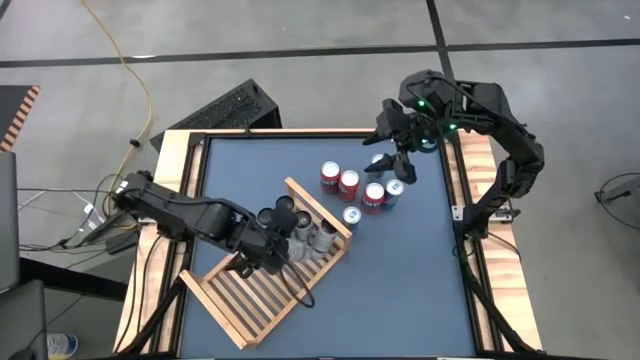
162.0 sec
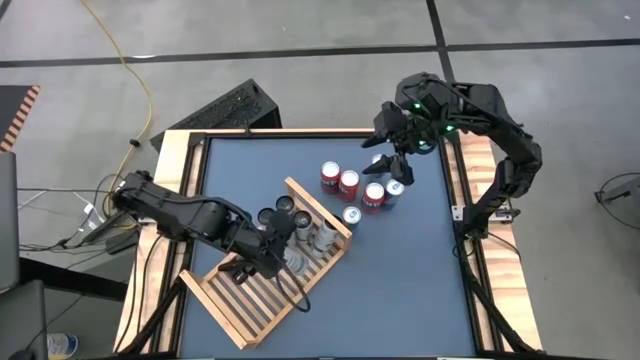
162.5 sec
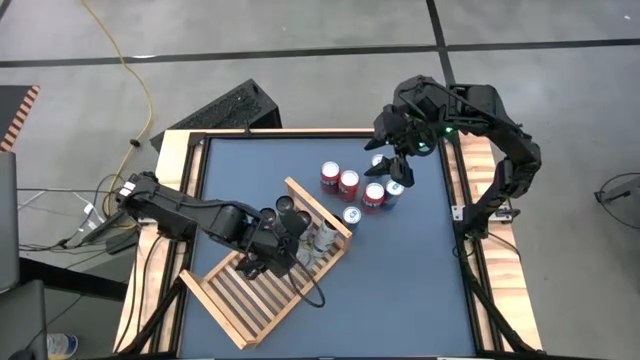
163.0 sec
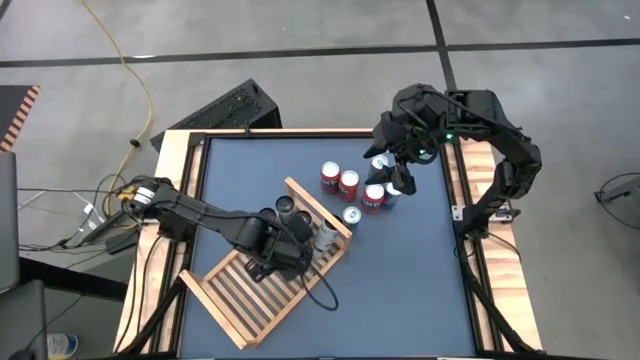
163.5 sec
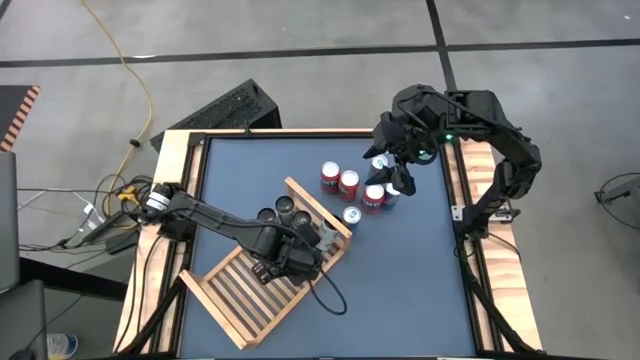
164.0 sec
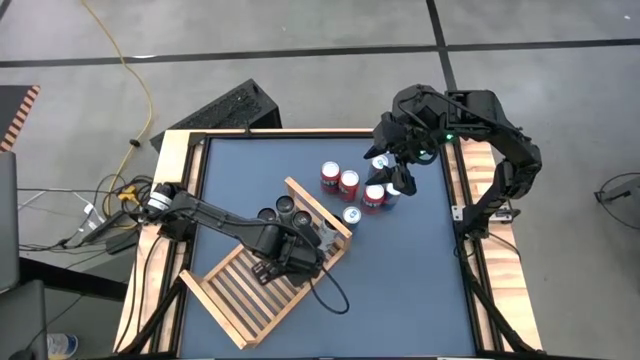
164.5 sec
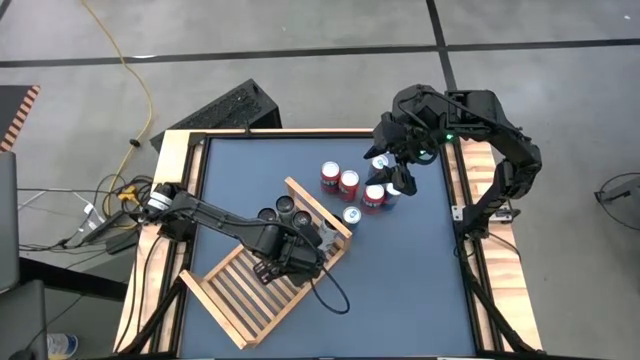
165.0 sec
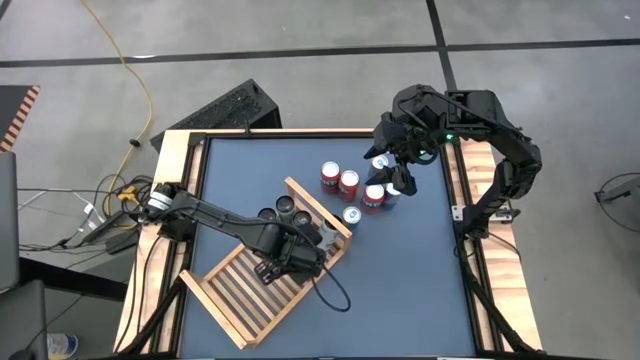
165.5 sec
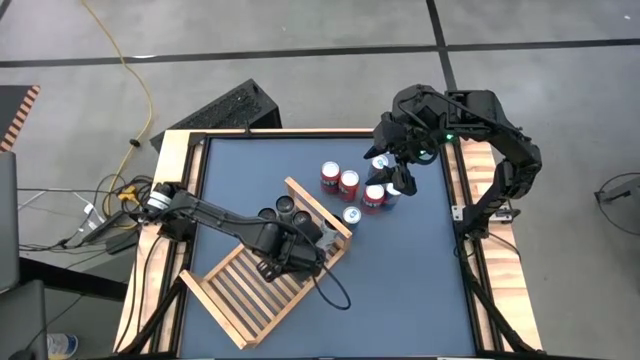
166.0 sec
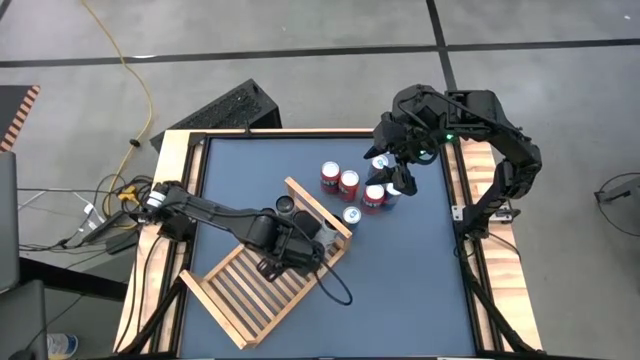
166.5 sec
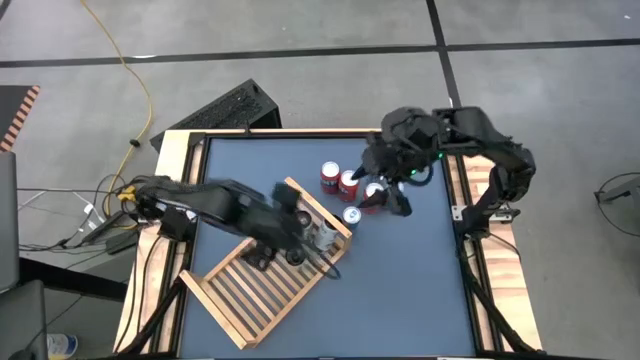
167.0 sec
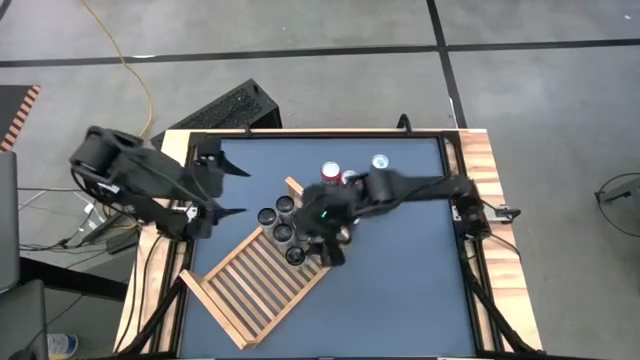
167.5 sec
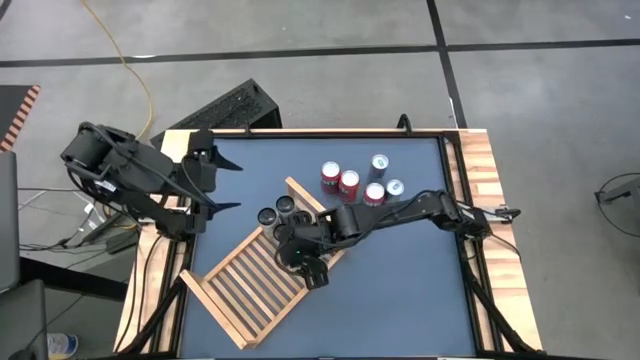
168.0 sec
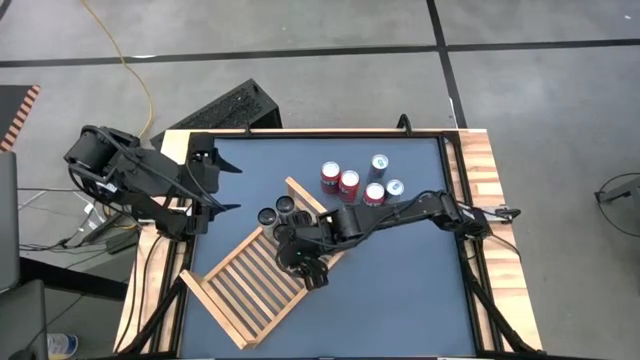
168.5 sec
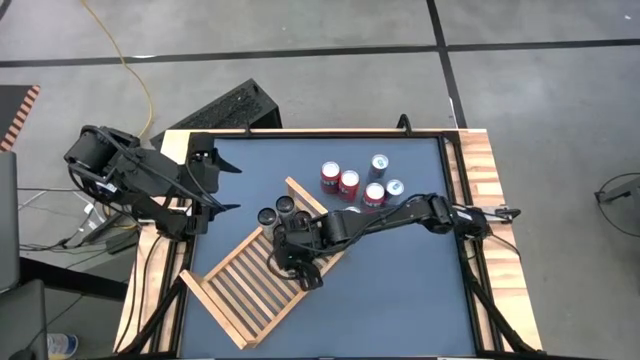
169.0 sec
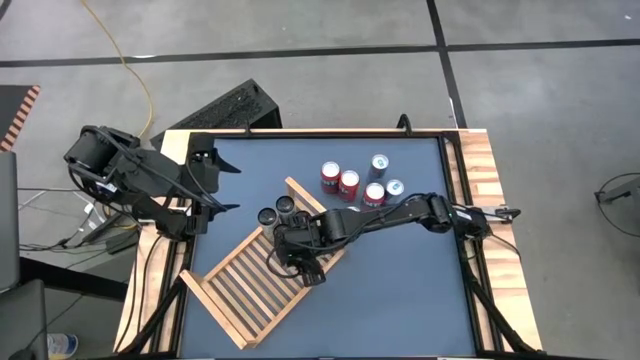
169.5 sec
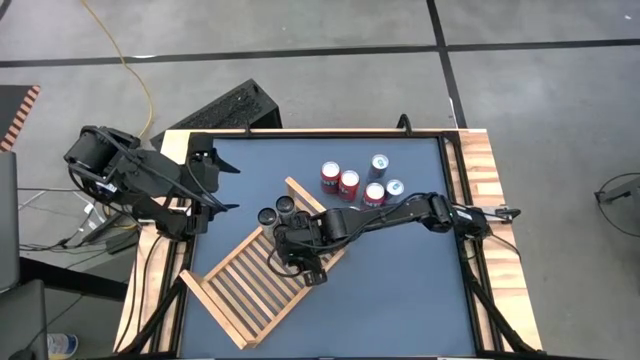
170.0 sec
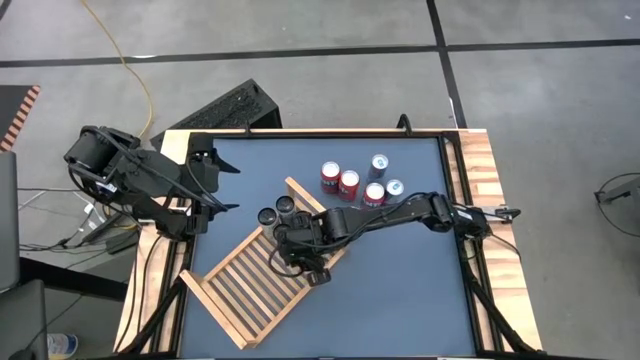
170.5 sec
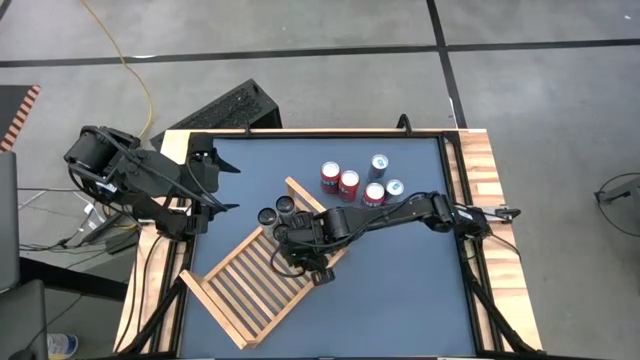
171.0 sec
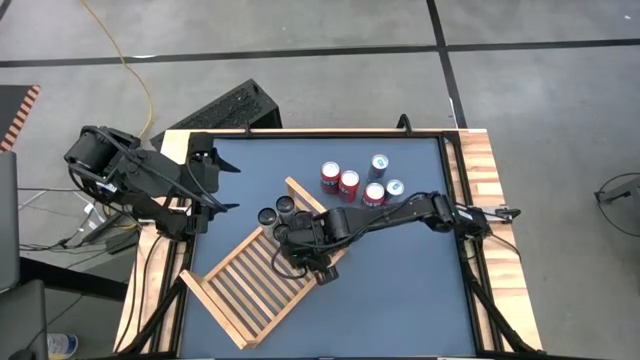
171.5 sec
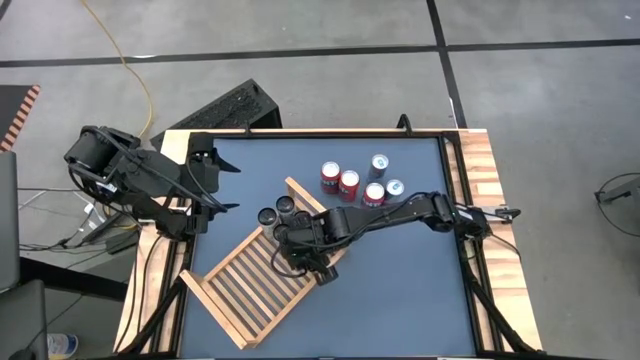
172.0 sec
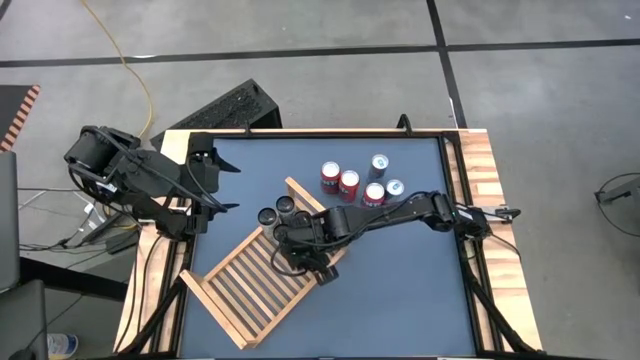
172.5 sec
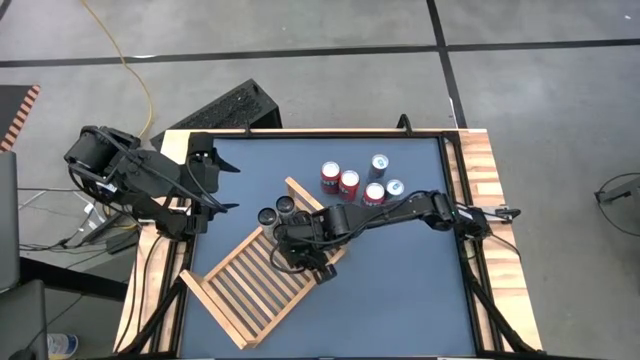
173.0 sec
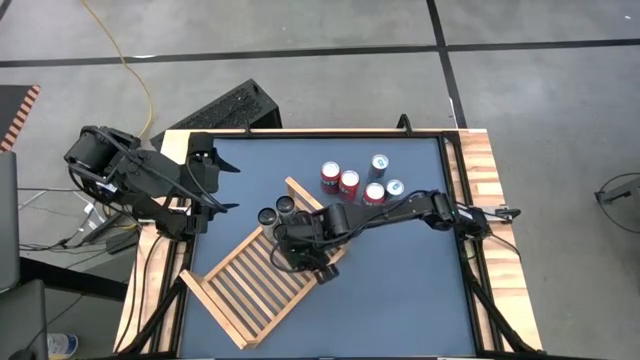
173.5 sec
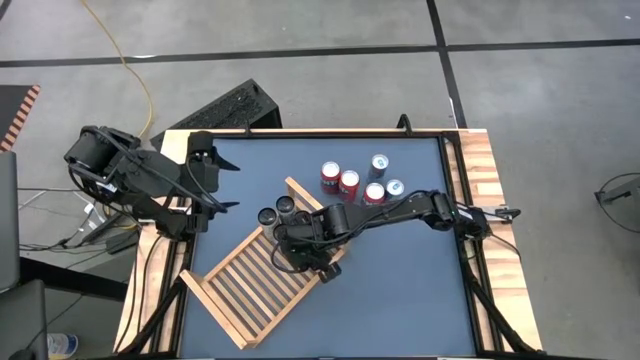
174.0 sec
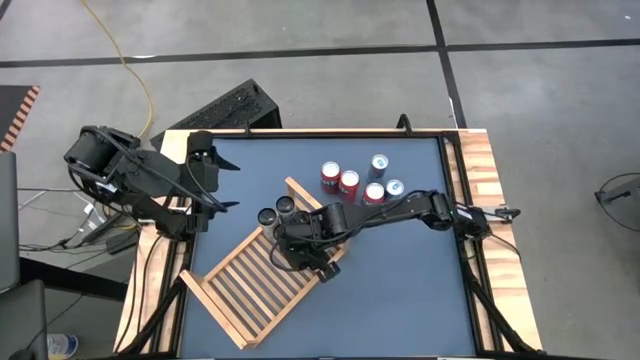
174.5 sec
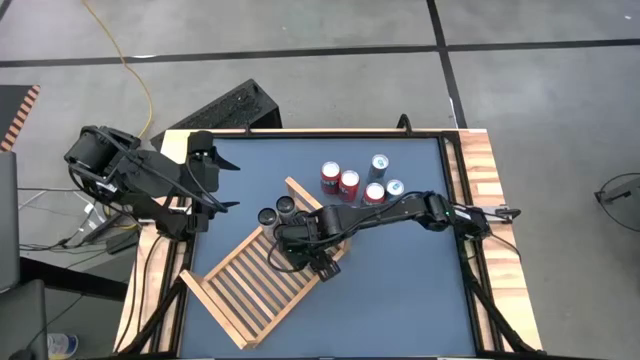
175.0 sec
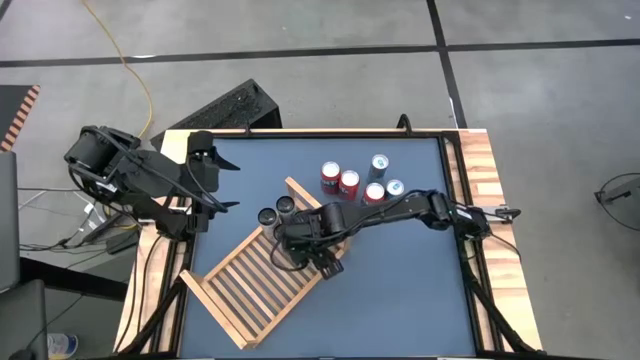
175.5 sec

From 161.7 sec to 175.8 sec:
Task: Place canned beverage on shelf
Put the white yellow soda can on the shelf aligned with the other white yellow soda cans

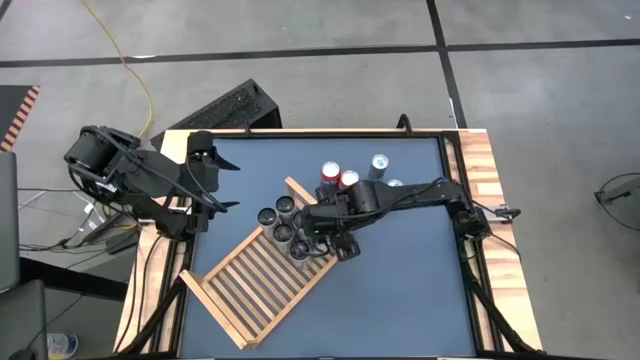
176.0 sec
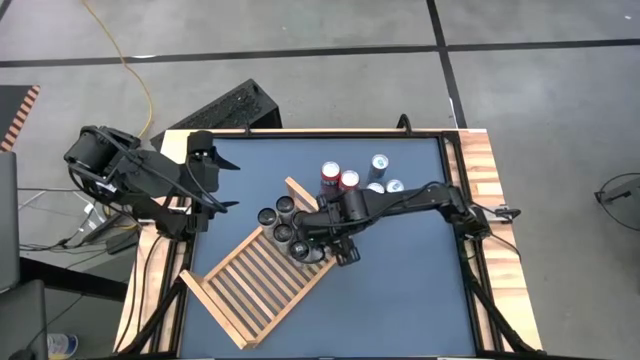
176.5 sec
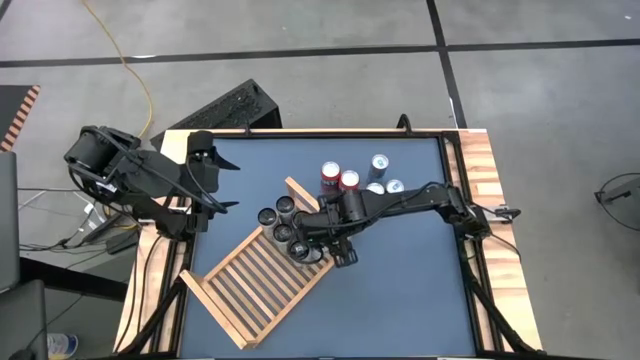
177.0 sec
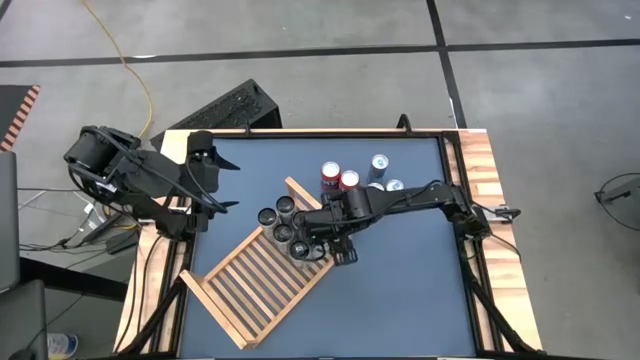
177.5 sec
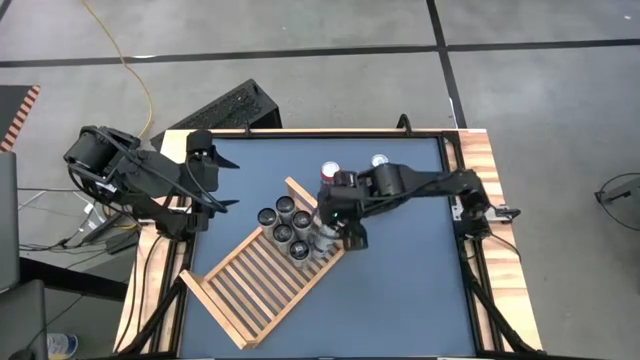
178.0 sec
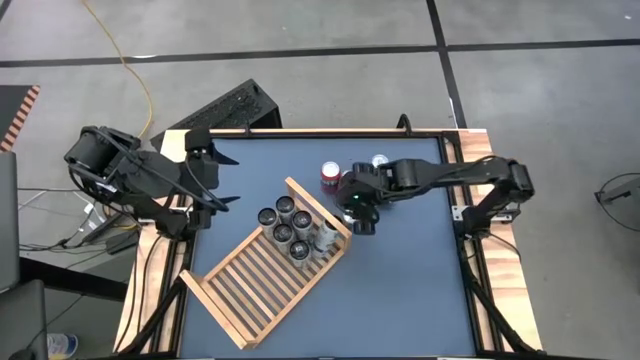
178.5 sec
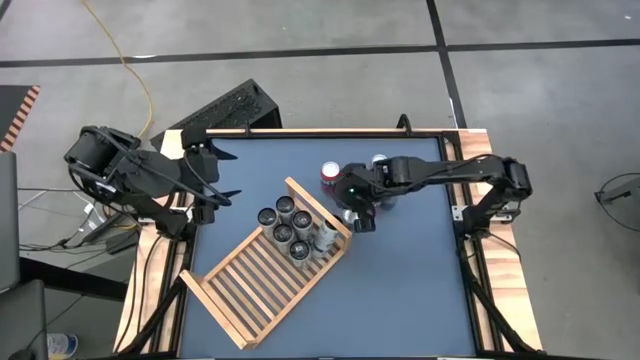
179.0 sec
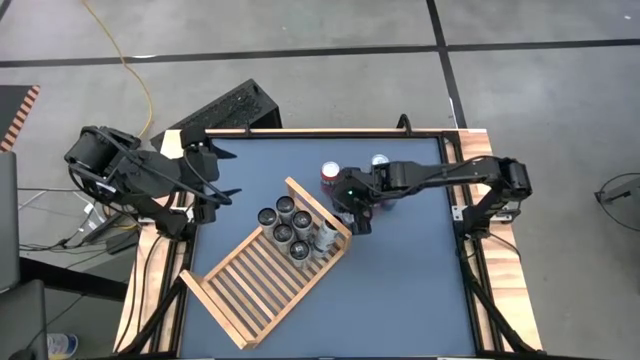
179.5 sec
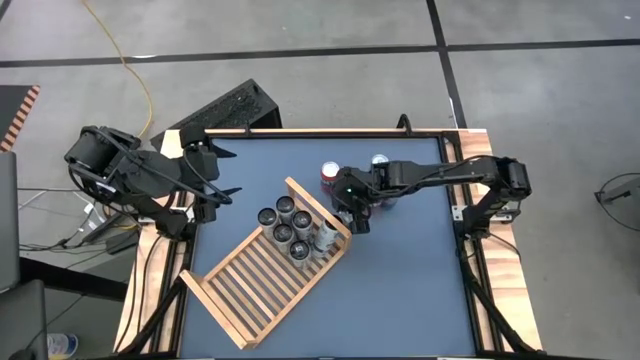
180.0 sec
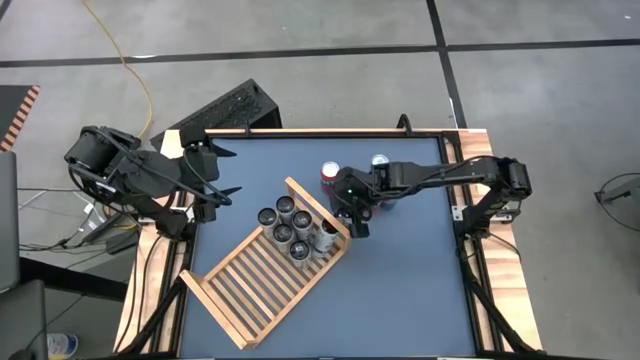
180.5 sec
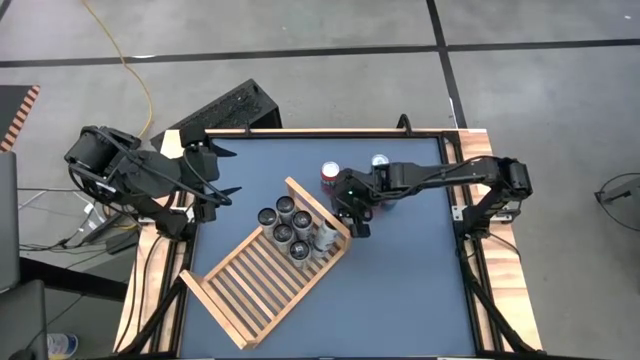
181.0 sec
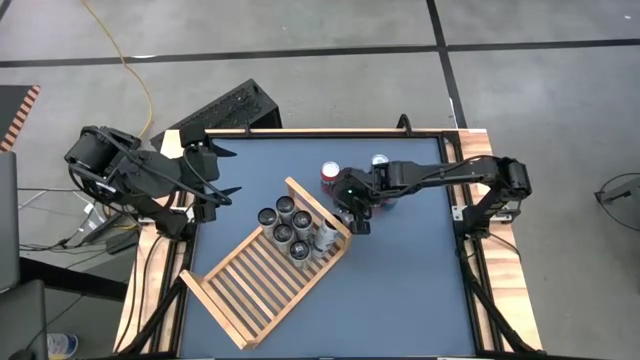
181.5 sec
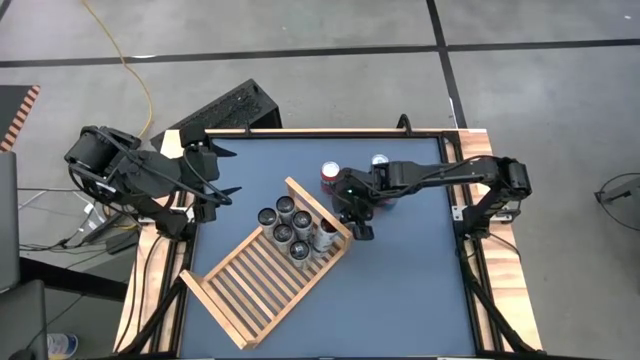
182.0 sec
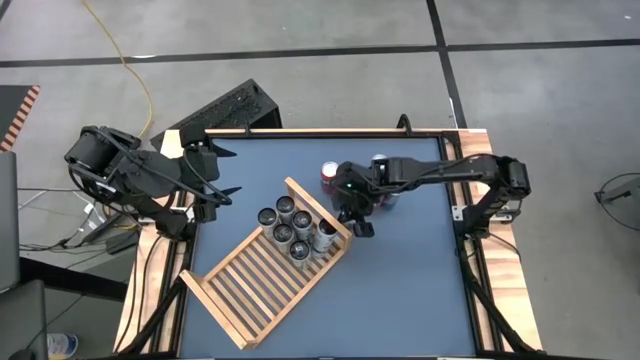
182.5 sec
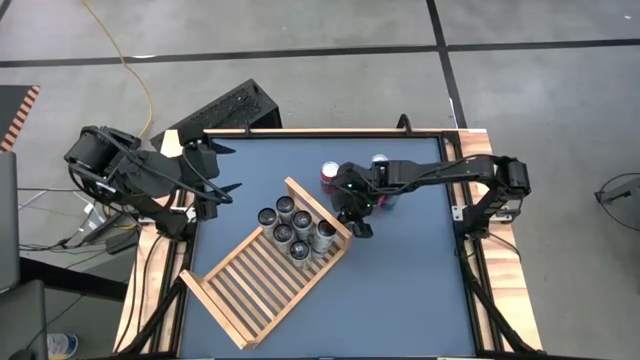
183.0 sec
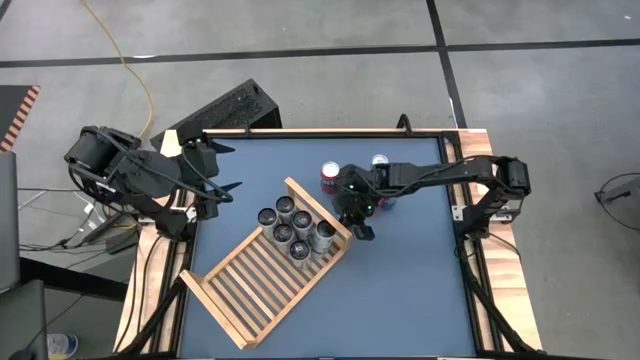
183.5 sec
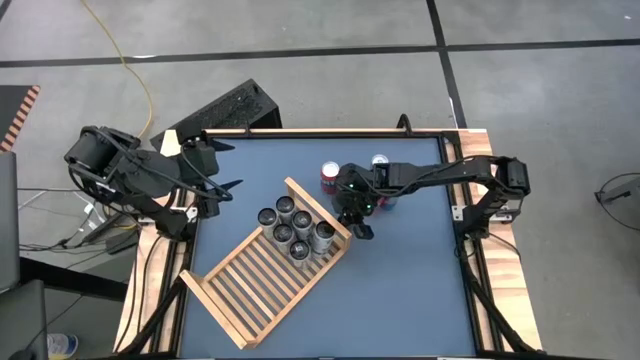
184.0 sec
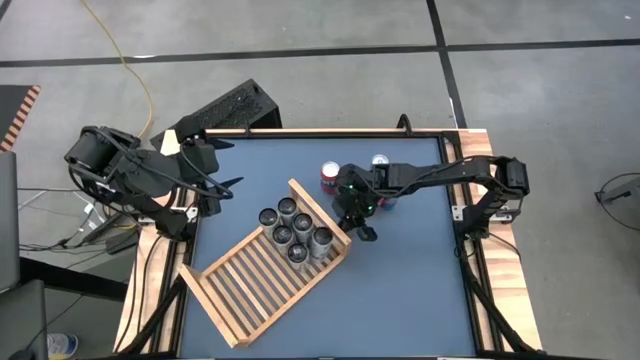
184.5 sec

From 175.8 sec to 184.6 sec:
Adjust the white blue soda can on the shelf
